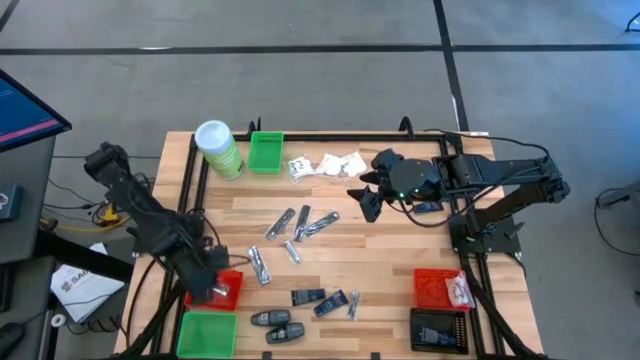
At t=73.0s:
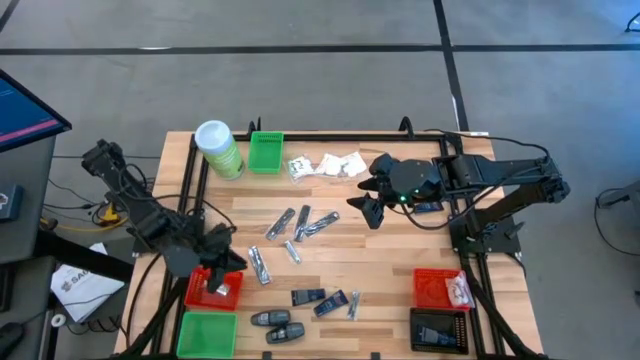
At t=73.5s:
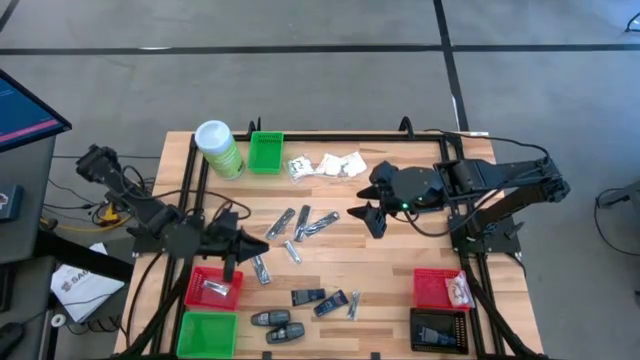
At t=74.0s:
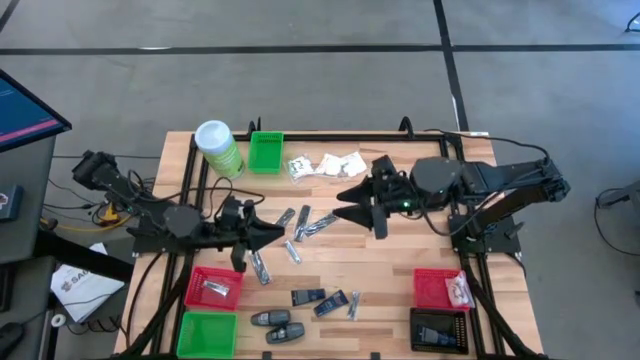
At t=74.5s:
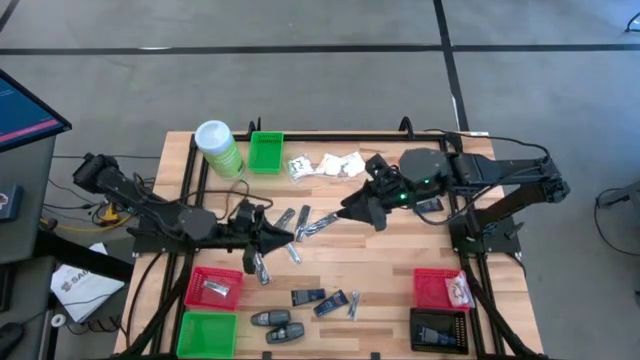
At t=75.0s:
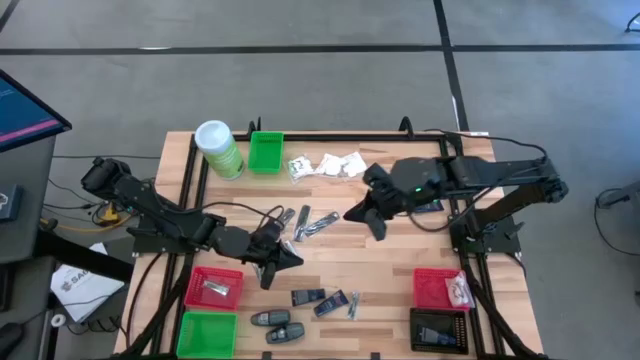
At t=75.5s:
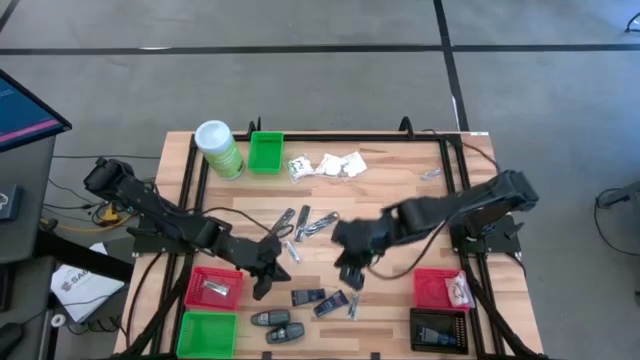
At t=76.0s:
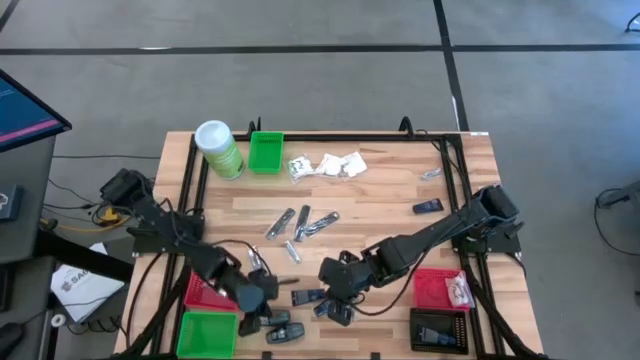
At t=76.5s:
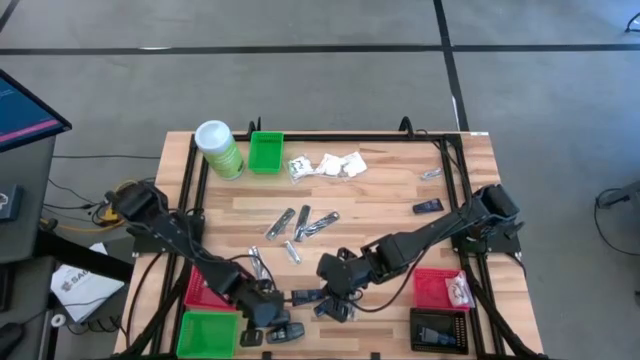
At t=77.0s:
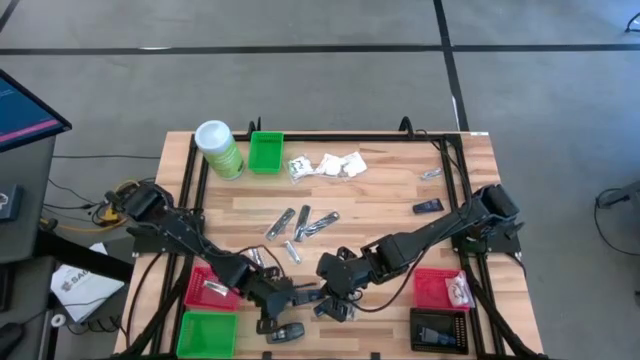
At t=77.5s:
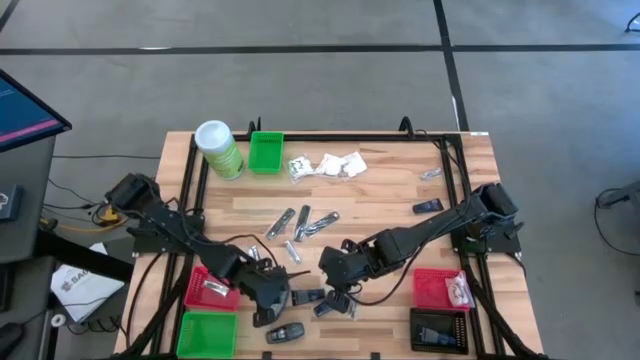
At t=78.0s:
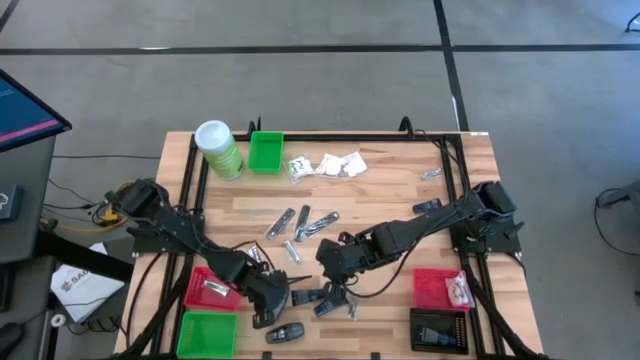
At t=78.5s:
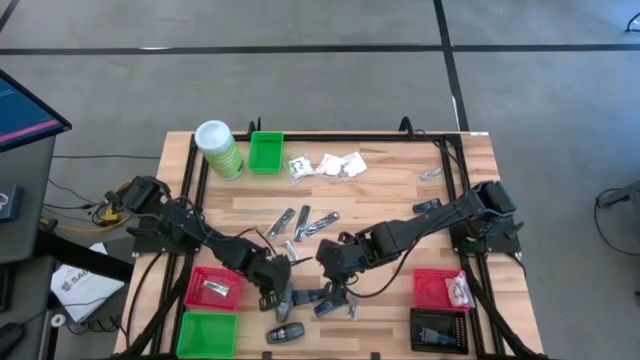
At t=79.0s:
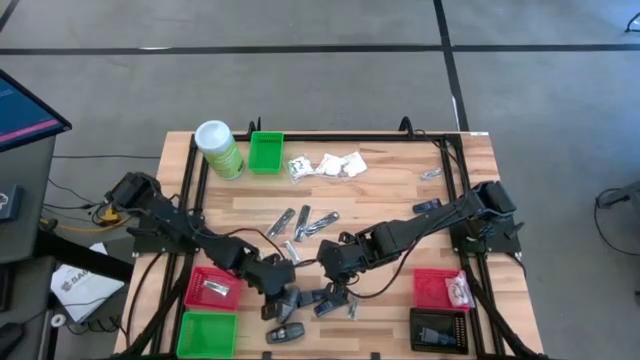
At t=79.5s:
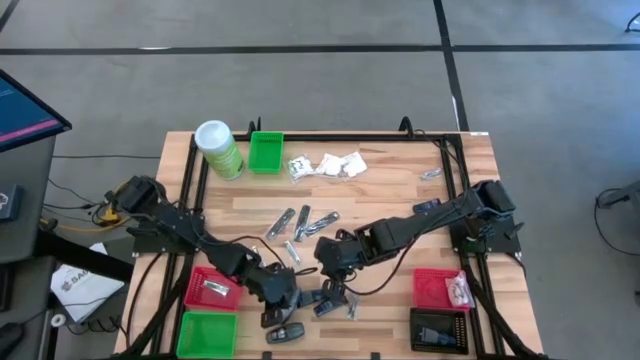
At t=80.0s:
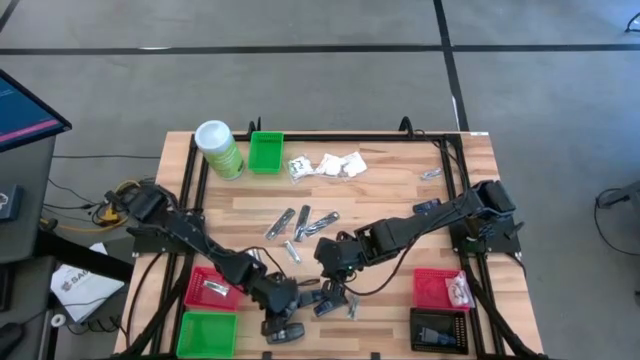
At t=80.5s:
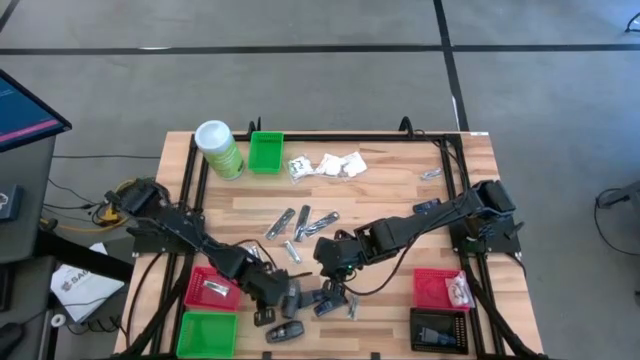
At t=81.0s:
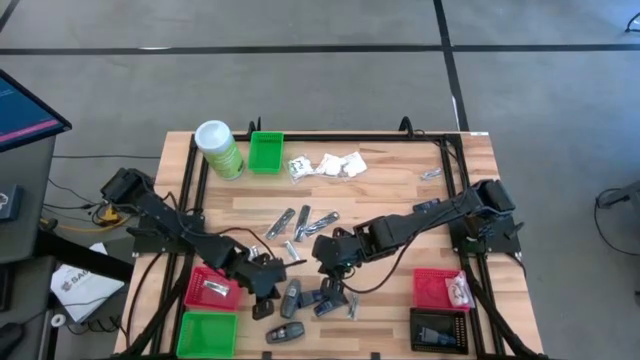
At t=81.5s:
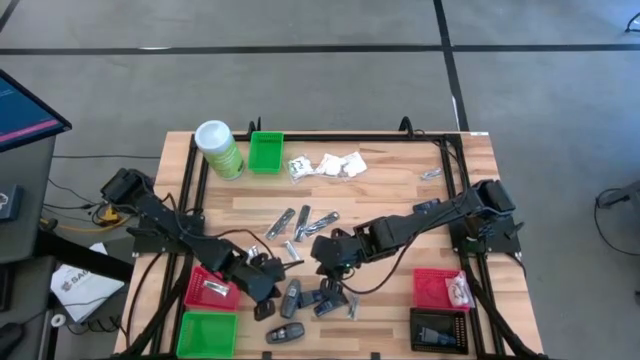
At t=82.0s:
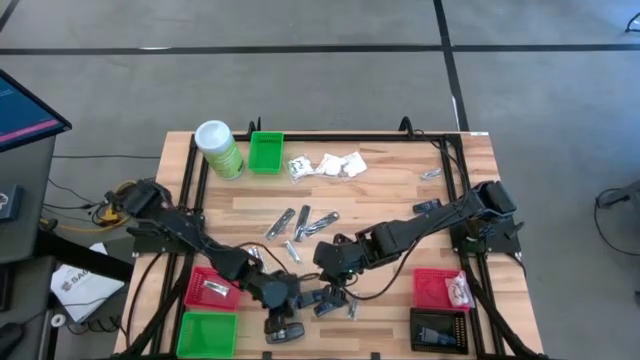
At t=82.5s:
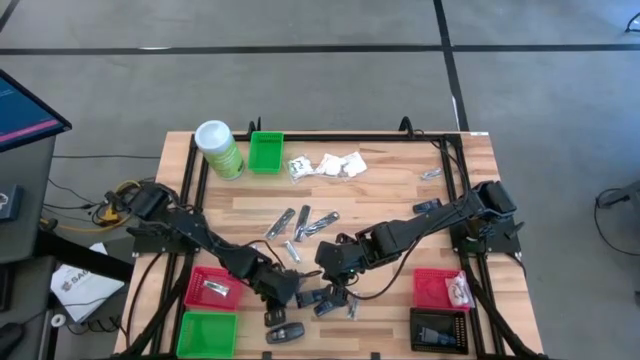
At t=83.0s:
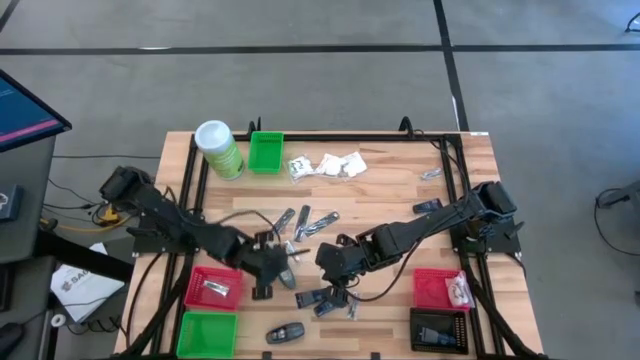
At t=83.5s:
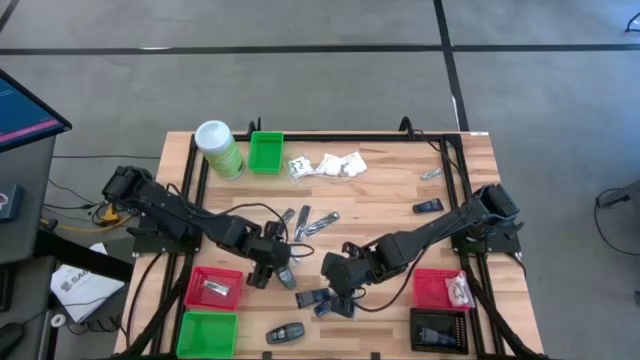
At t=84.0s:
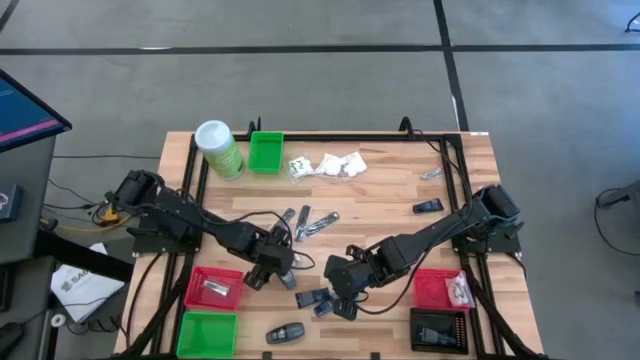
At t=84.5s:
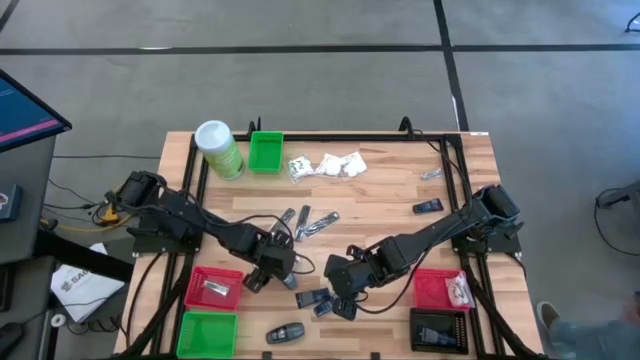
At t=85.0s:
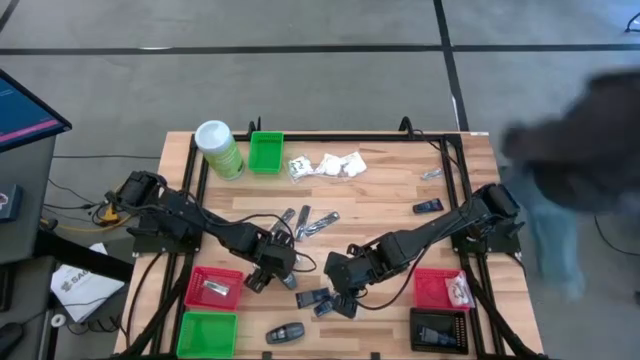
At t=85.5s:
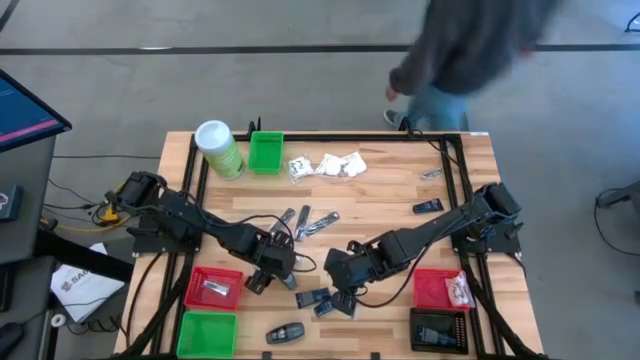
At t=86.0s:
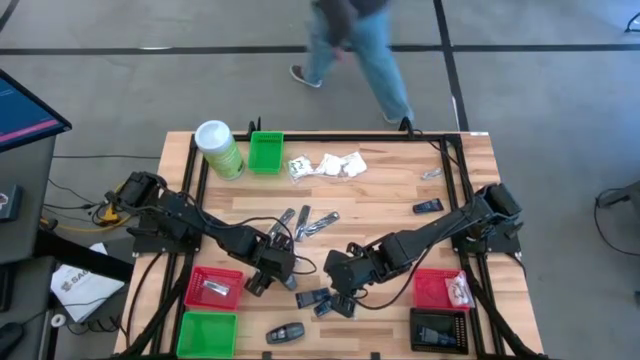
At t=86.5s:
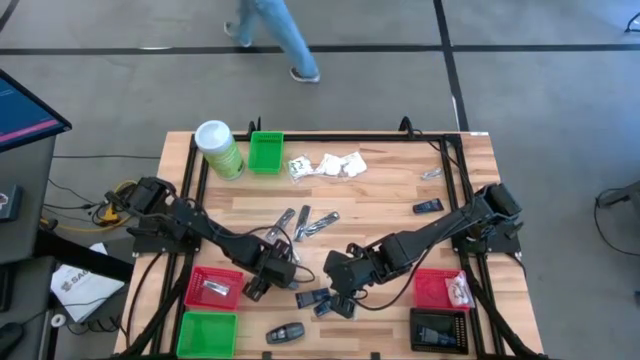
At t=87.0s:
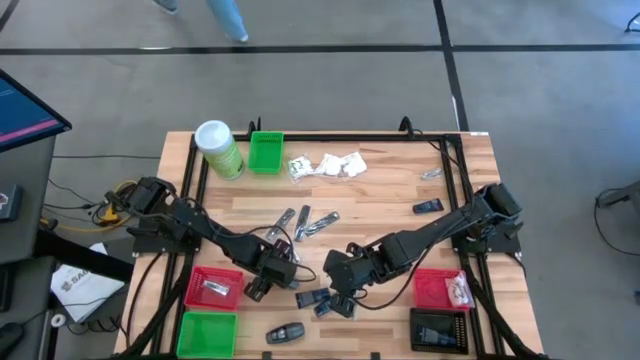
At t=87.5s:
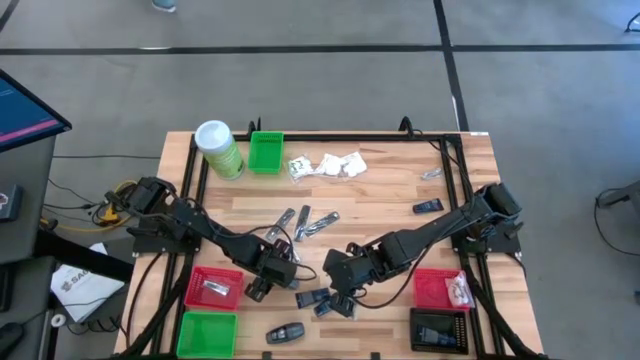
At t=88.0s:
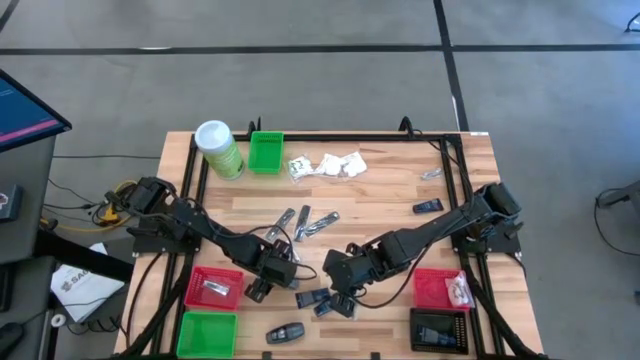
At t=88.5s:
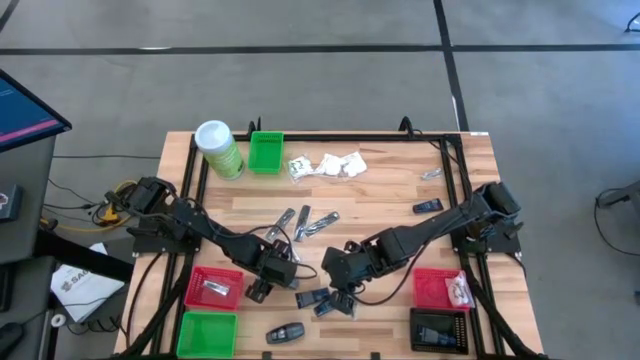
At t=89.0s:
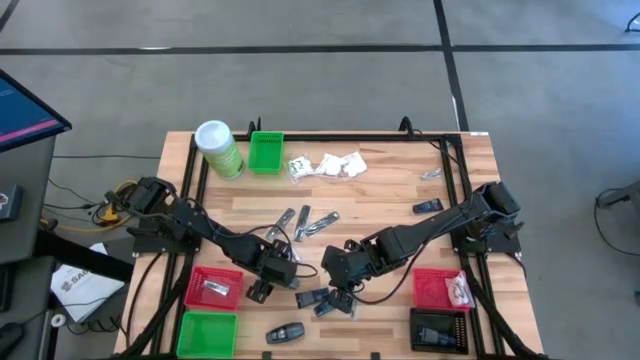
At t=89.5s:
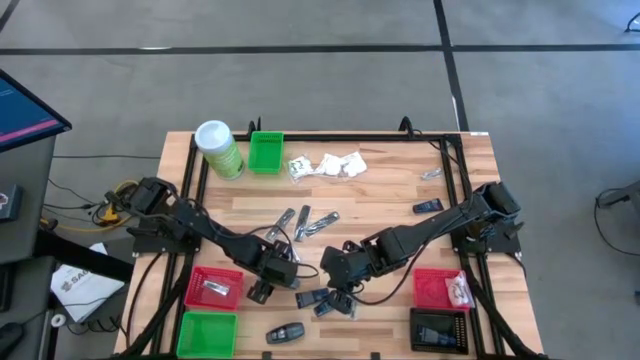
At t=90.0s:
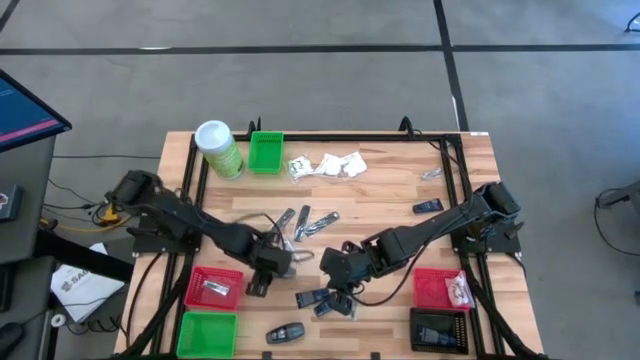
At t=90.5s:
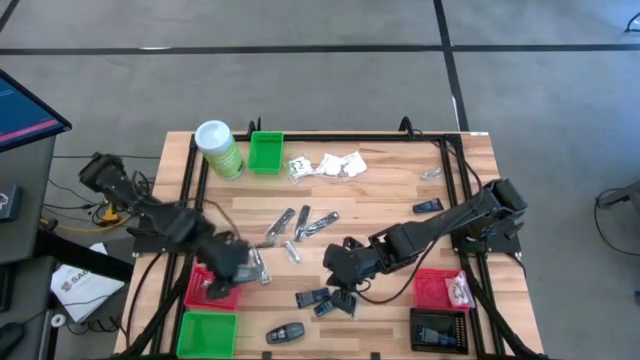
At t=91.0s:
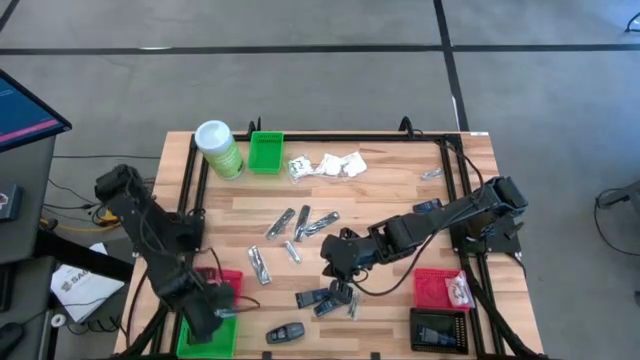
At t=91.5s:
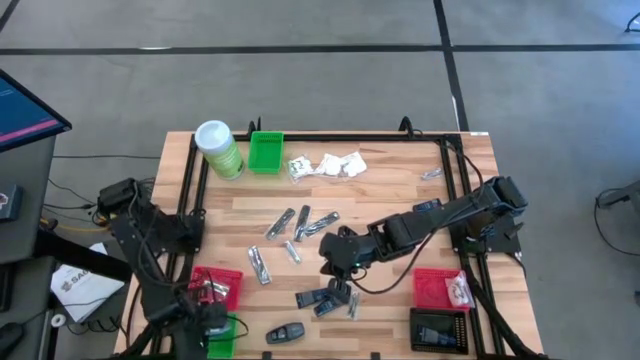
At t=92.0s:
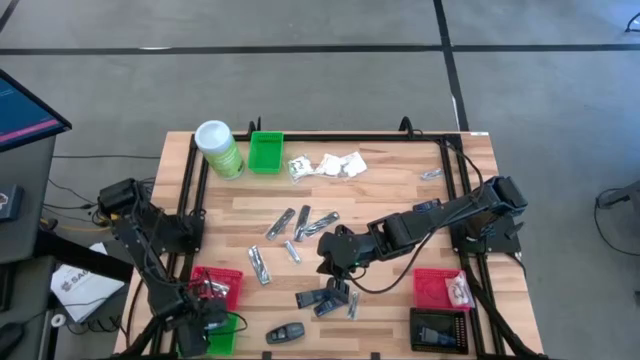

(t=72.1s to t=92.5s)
Task: Pick & Place Travel size toiletries
Put the top deodorant into the bottom green bin

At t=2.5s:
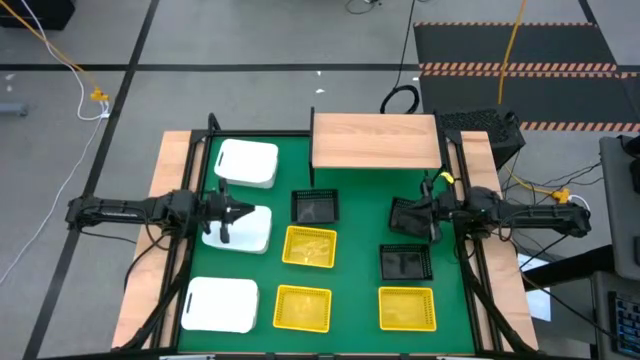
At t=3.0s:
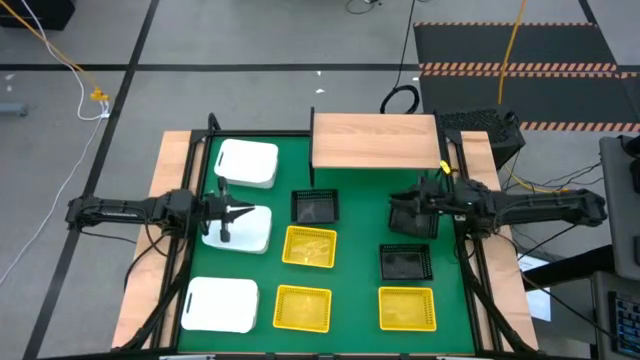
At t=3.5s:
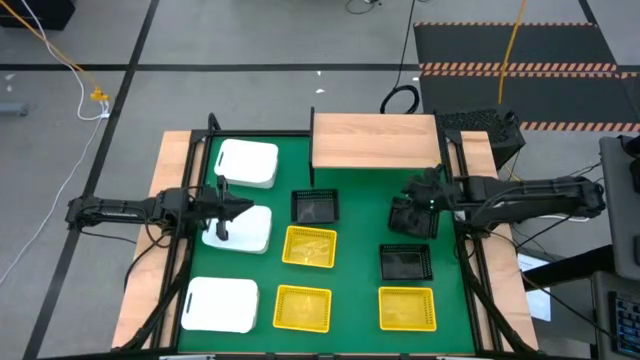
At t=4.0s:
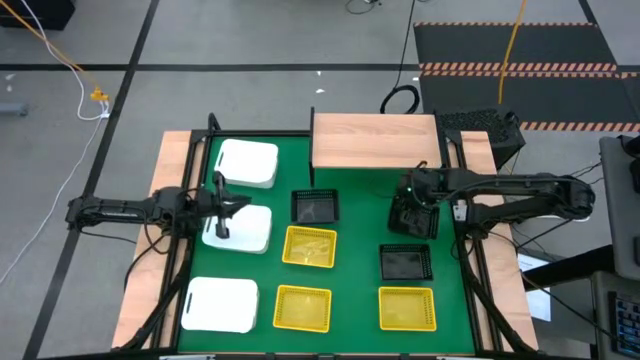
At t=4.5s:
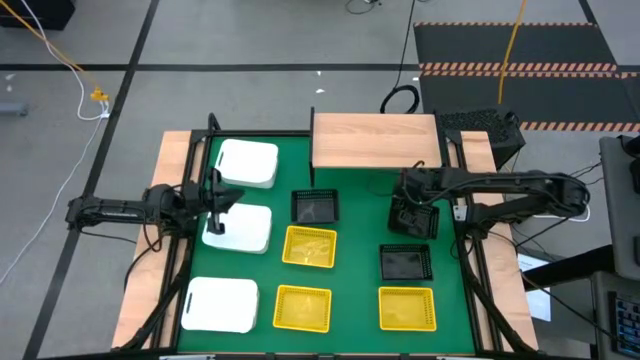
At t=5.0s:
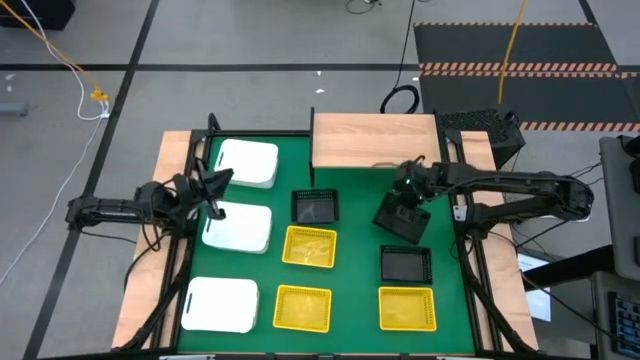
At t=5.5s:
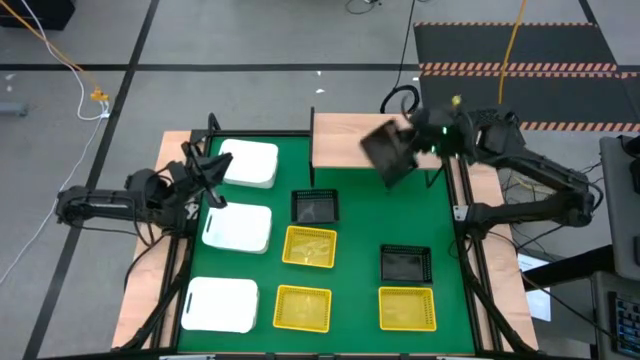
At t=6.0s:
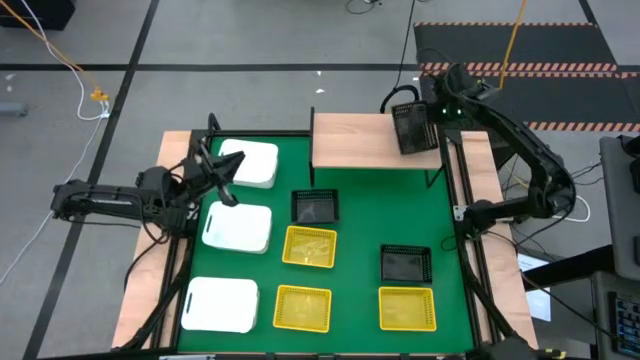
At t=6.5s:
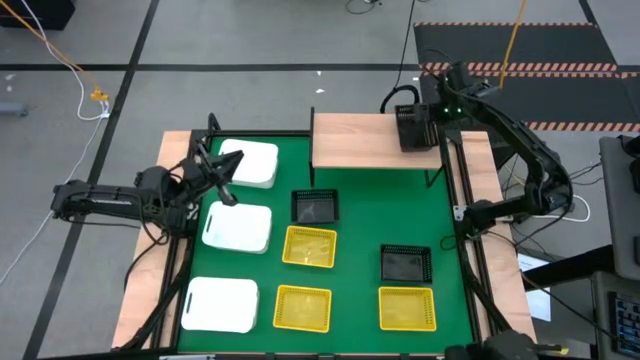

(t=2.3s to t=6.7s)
Task: Stack baskets on shelf by color
Put the top right black bin on the shelf
